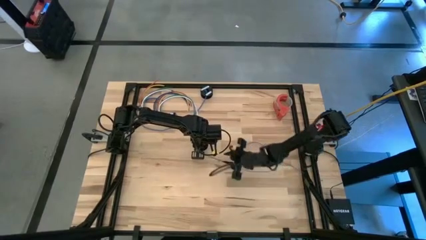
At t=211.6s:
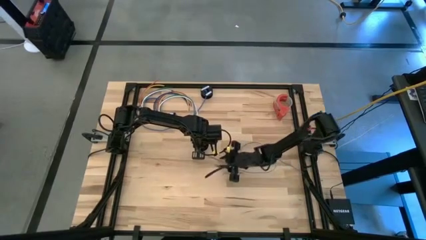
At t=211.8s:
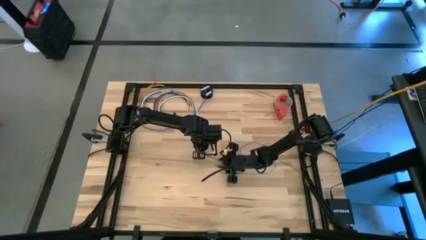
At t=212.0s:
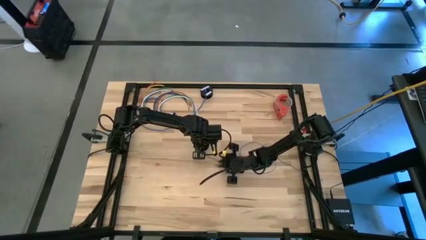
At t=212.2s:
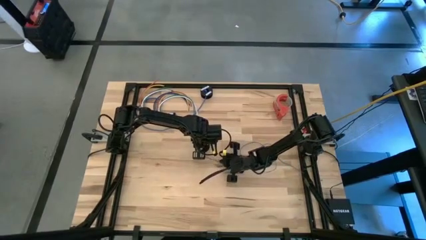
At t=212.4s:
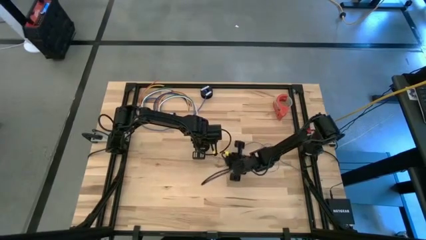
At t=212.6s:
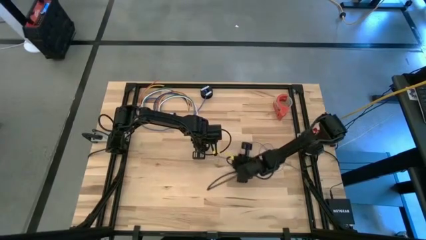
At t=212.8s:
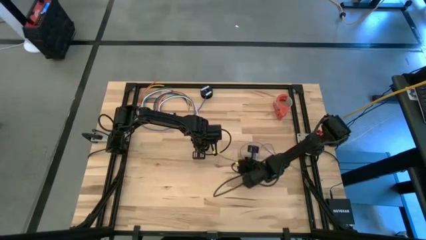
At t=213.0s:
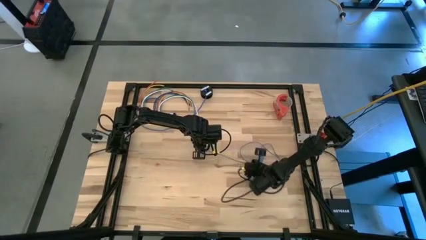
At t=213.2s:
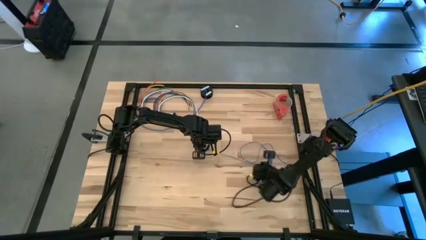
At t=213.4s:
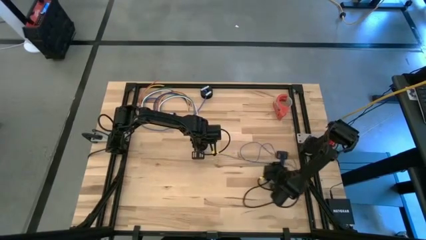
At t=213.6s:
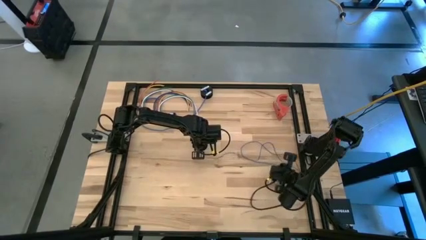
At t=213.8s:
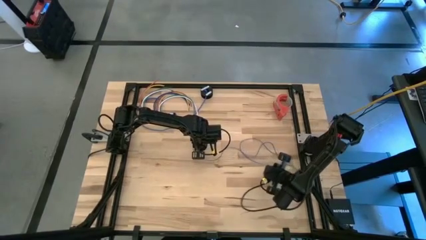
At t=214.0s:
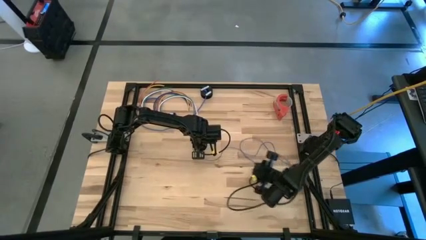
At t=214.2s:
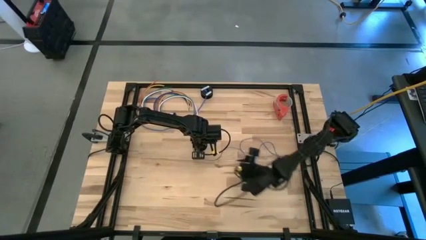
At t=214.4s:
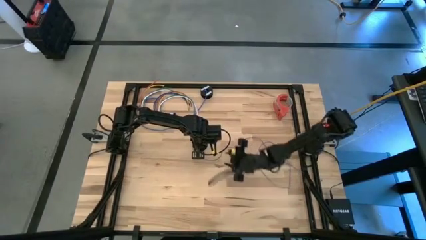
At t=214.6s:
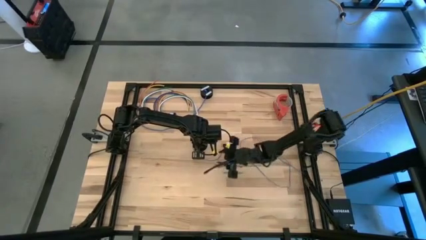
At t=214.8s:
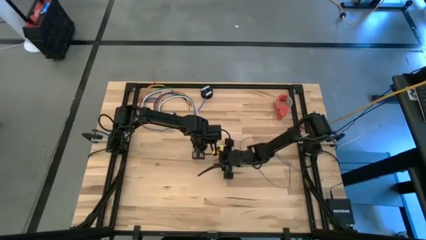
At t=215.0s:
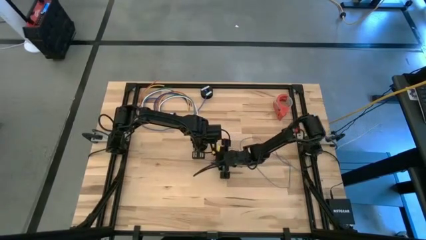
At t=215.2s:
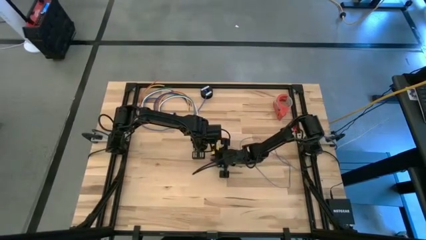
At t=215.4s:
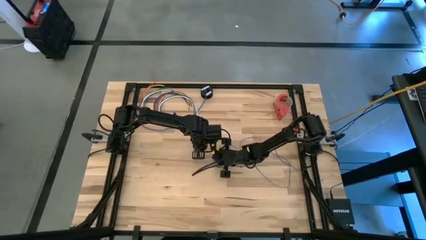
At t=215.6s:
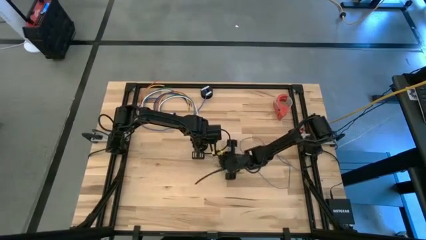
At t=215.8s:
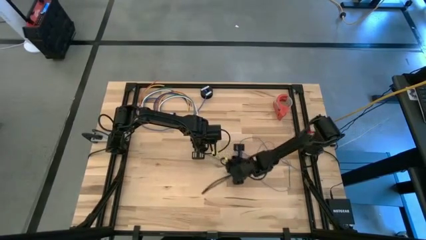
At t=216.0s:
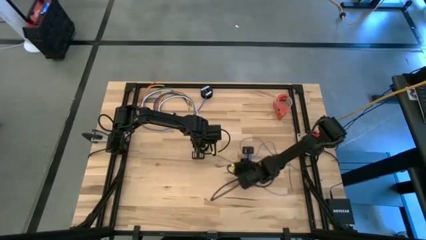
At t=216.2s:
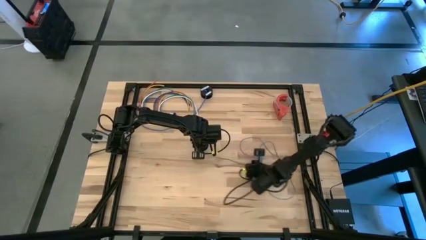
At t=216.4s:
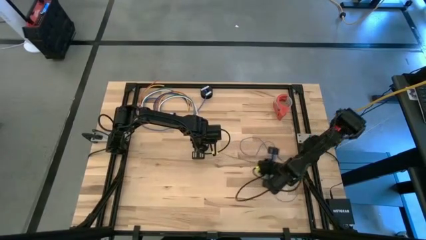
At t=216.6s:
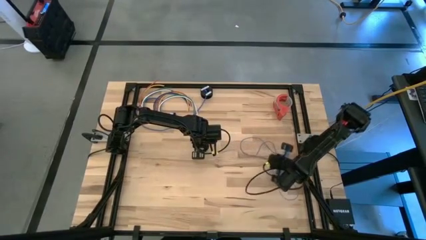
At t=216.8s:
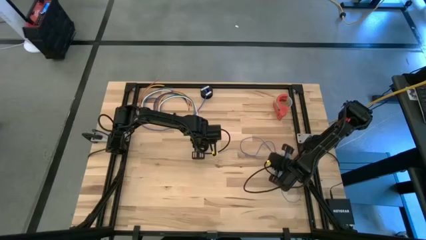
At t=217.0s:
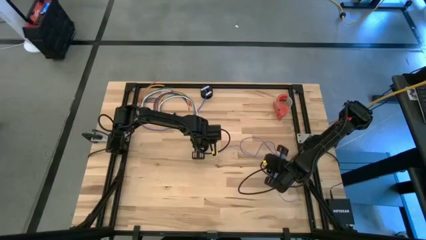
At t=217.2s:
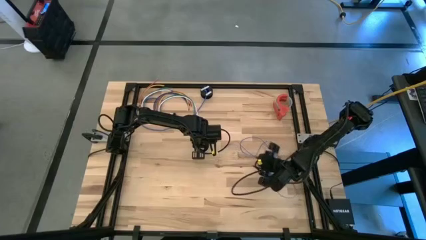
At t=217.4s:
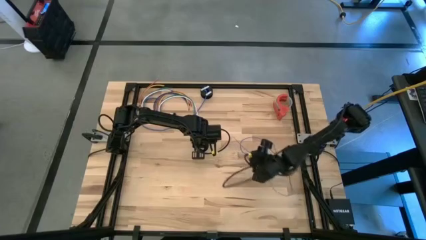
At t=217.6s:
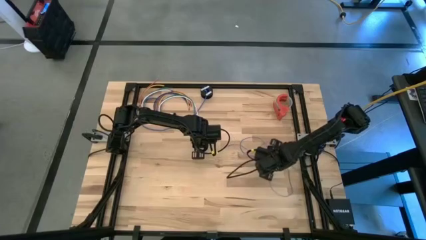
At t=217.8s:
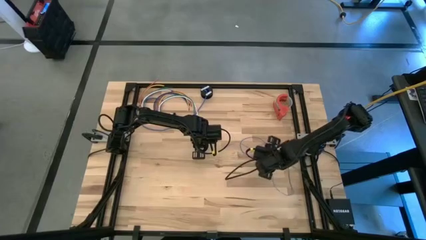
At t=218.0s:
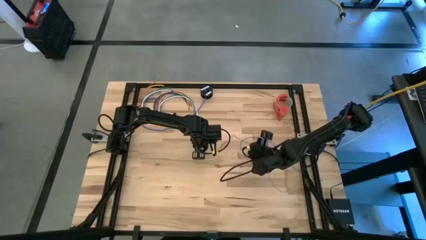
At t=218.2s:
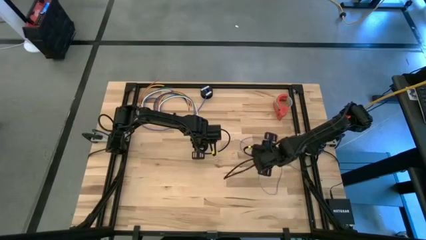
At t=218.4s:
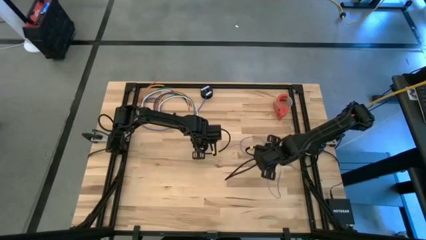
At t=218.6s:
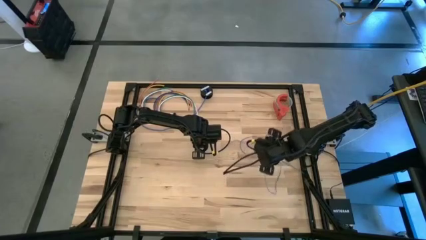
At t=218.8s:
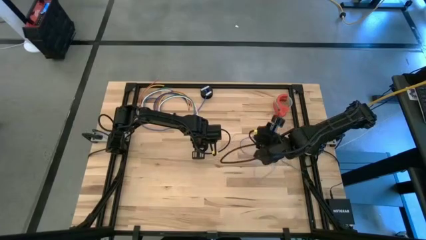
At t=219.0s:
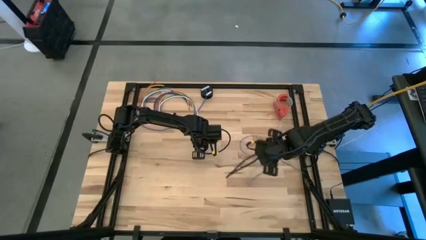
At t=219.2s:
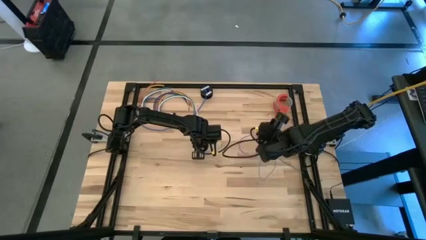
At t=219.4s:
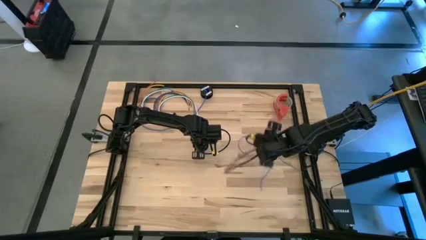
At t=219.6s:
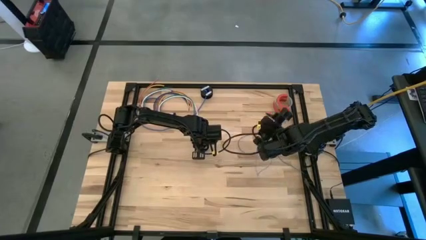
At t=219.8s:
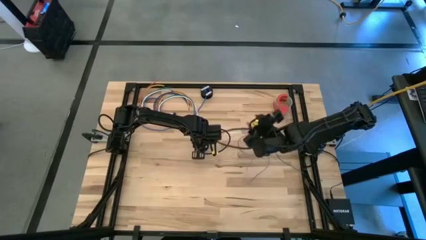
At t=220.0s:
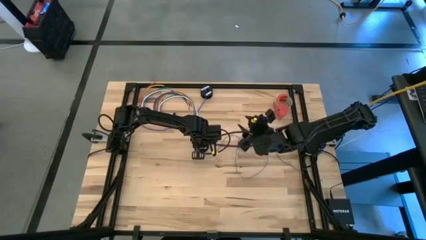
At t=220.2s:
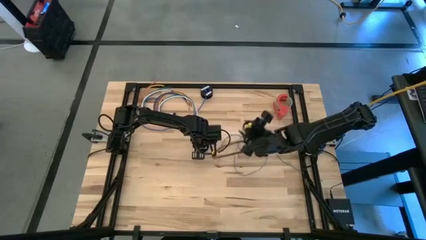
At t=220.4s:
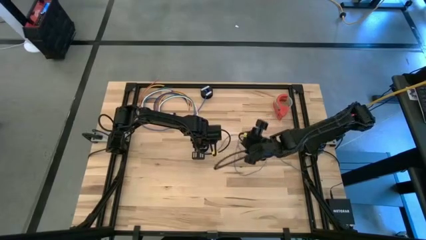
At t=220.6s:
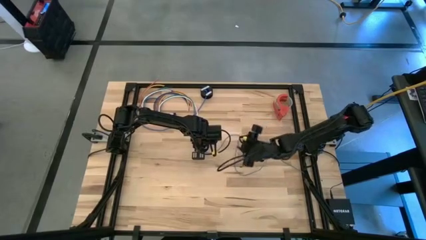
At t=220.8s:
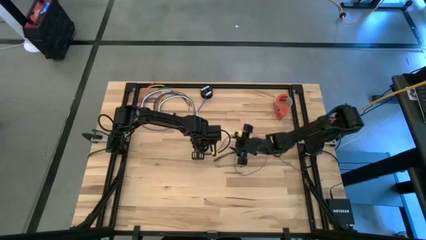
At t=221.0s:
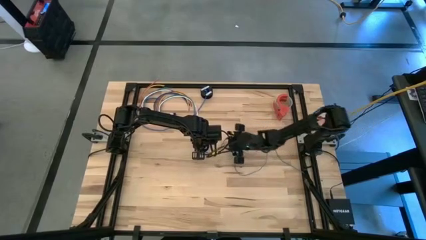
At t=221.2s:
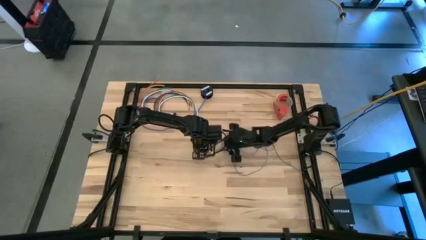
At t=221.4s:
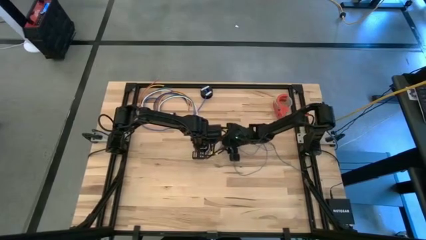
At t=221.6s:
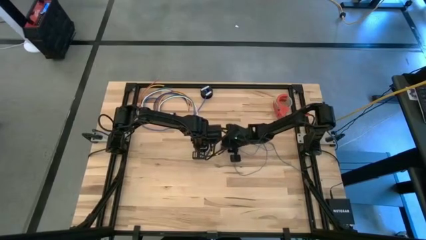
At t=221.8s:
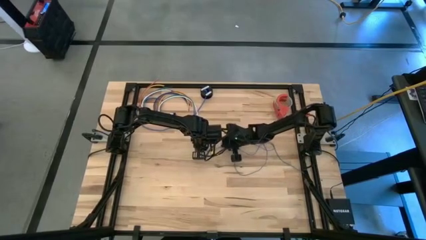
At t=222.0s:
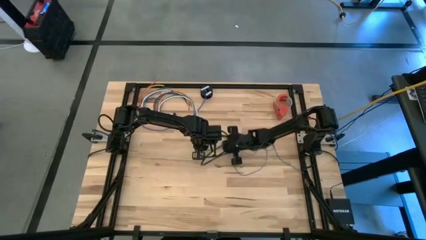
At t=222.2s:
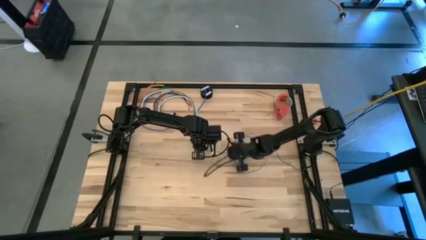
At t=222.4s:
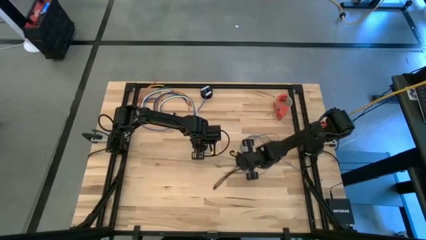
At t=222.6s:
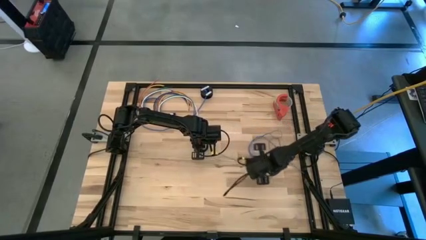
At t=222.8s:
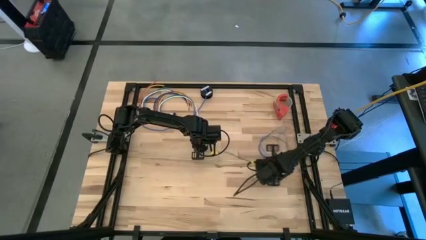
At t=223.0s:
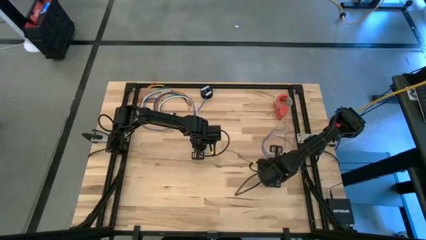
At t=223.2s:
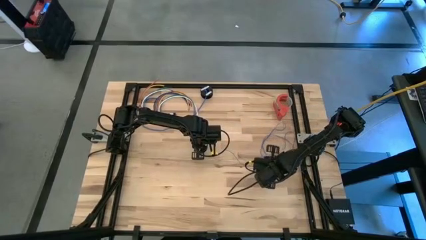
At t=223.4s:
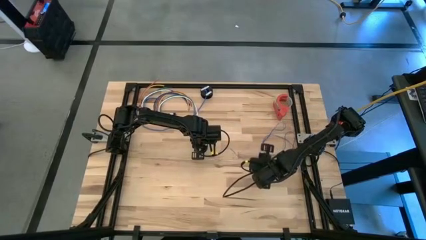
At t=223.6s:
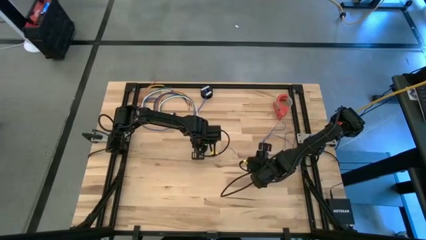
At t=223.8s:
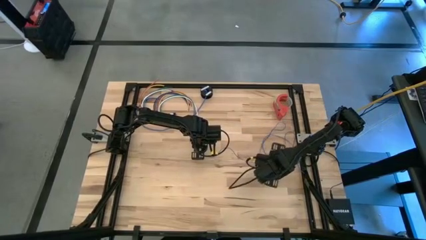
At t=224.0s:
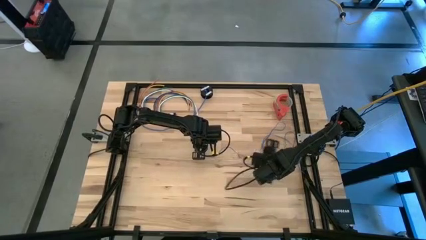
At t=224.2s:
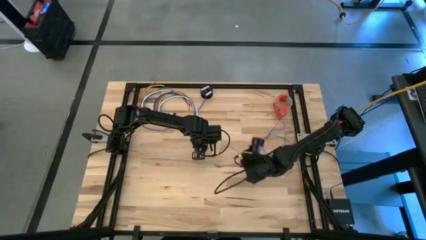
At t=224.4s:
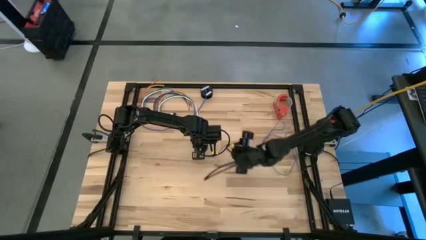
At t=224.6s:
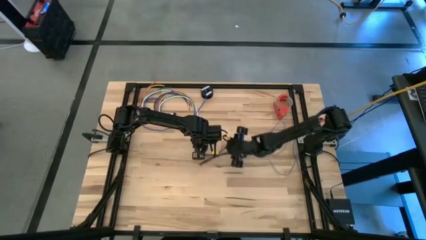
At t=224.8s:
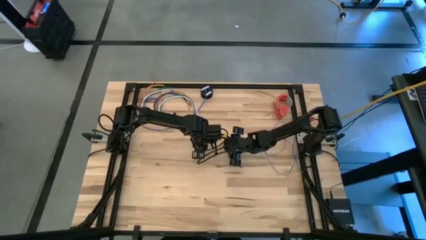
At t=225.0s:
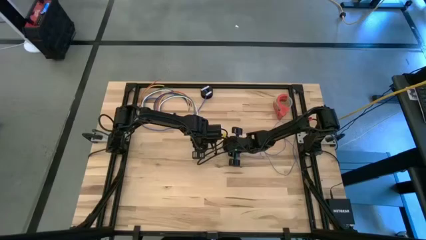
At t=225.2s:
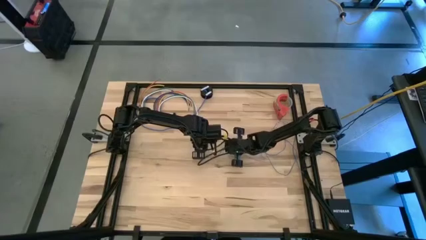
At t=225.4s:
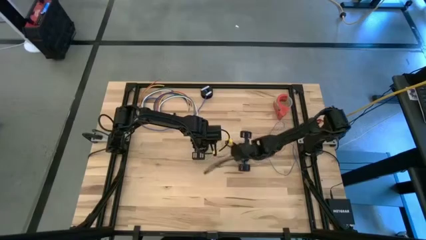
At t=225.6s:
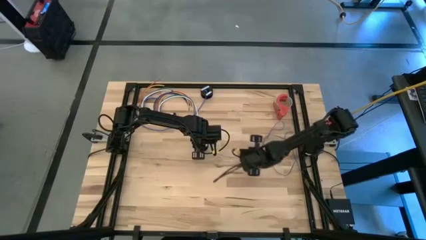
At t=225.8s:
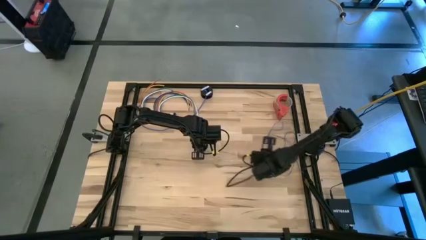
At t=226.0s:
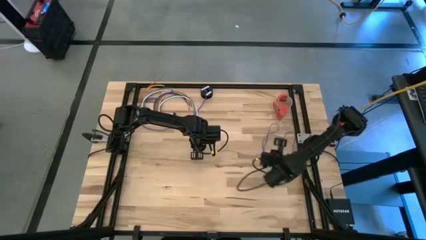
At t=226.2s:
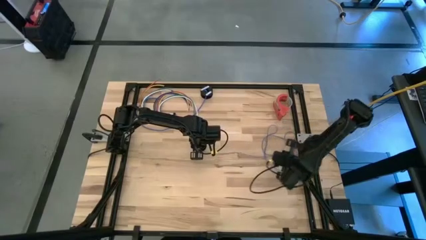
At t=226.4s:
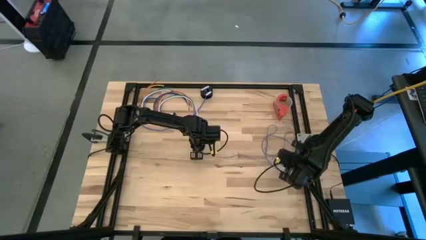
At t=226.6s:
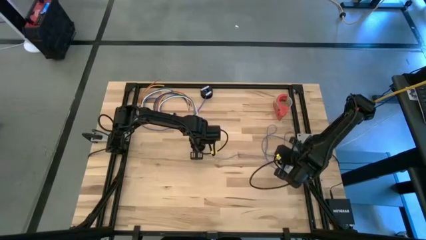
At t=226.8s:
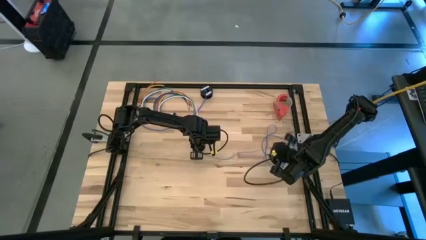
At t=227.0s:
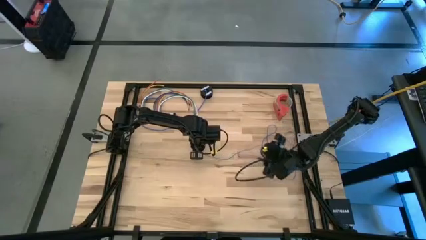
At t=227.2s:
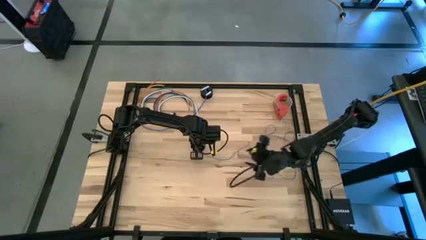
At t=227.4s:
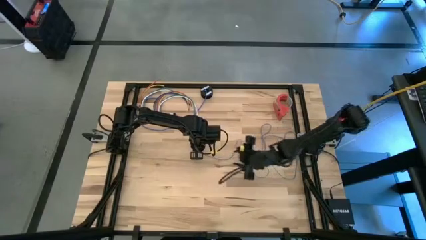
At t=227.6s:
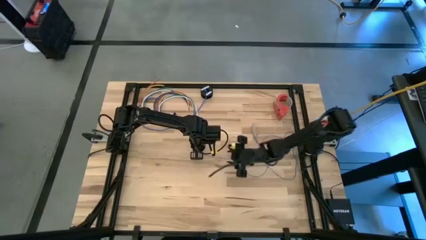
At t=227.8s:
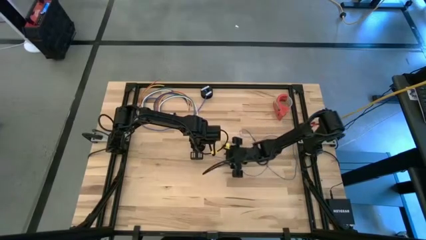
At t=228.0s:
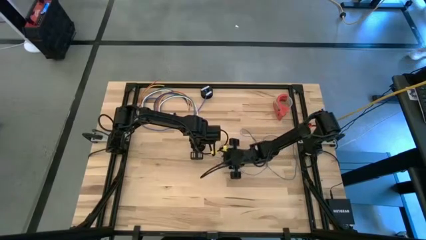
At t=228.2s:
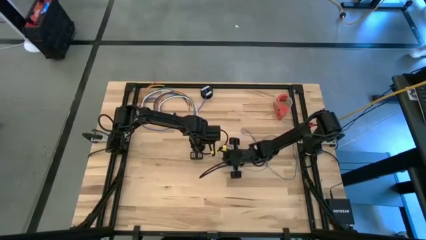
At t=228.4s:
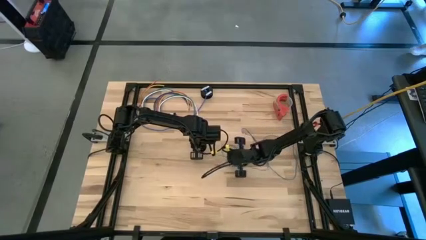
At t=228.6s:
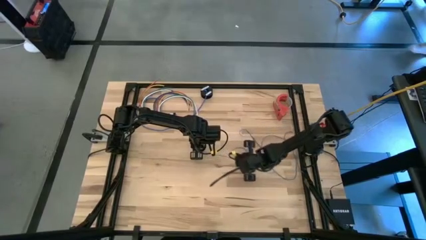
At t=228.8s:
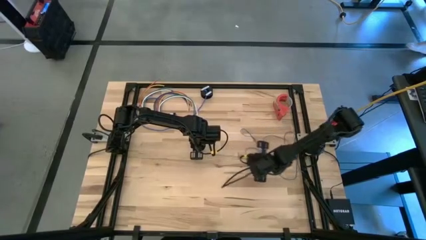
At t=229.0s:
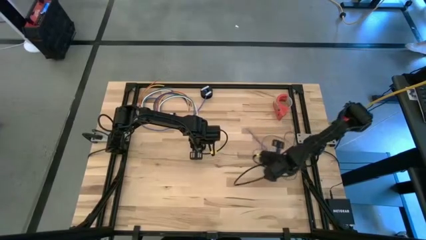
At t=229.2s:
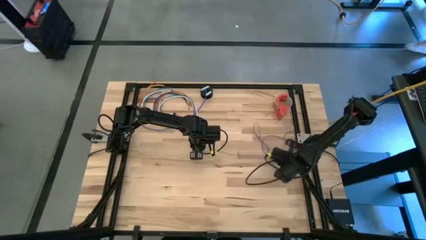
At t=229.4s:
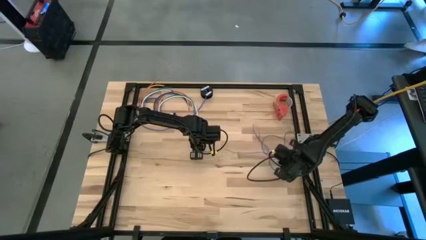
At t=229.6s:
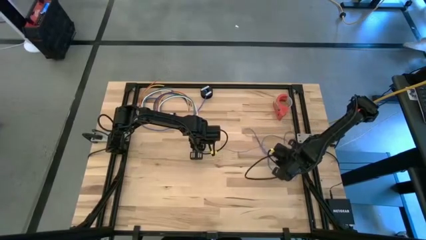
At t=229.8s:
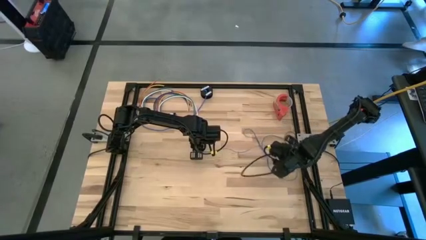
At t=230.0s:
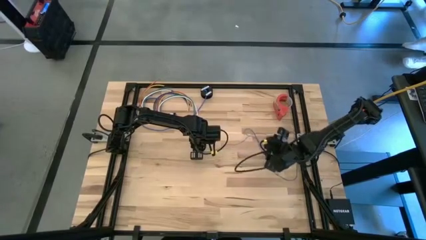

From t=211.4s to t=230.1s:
Task: Coil cords
Put the spool with the coiled wire on the table
